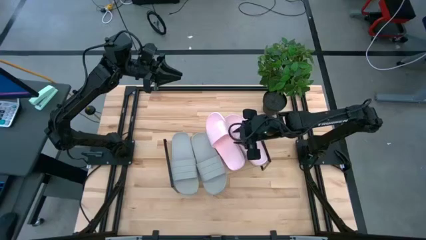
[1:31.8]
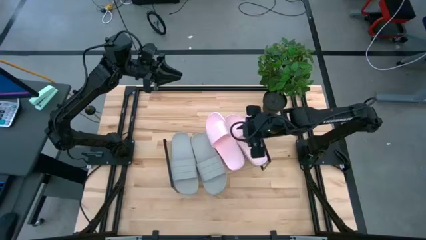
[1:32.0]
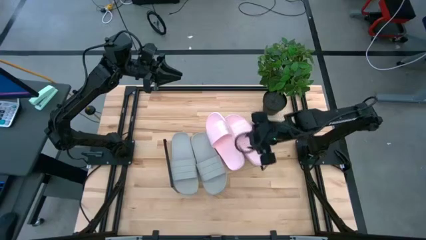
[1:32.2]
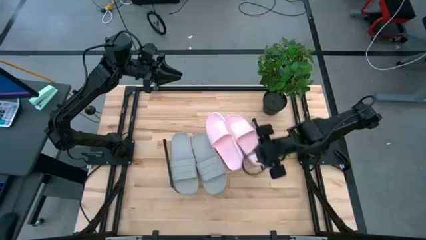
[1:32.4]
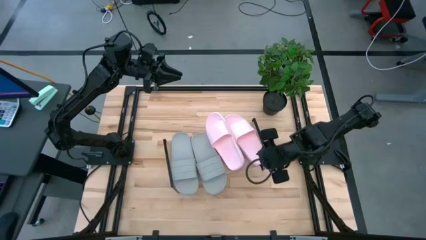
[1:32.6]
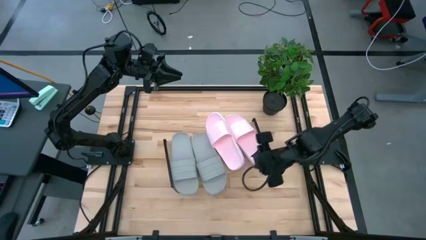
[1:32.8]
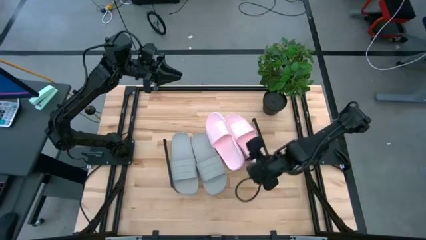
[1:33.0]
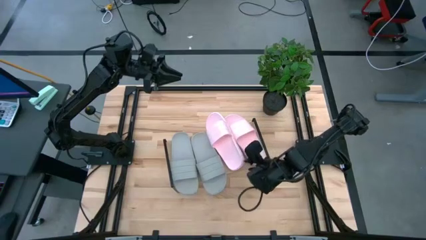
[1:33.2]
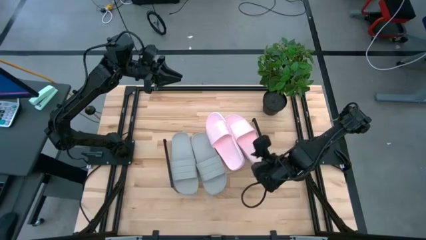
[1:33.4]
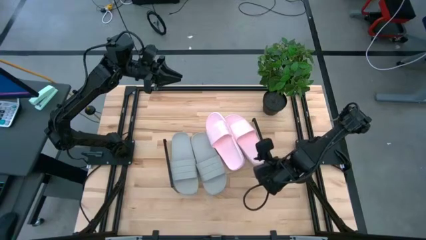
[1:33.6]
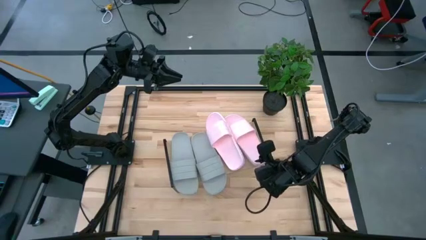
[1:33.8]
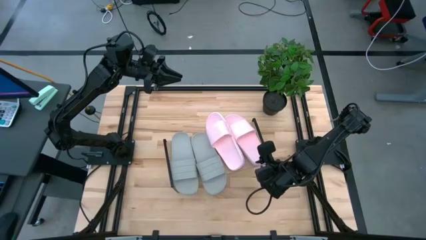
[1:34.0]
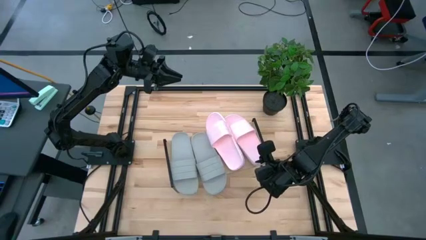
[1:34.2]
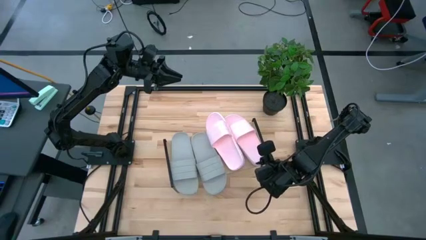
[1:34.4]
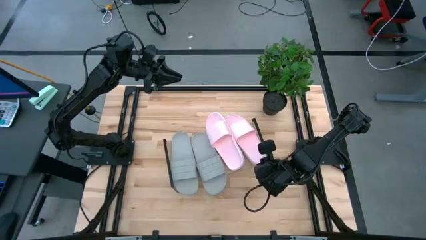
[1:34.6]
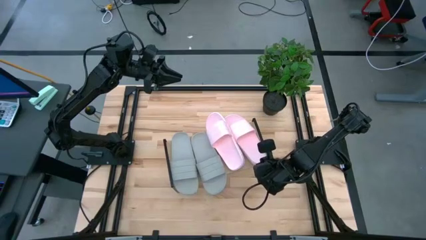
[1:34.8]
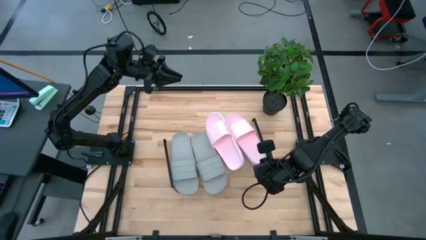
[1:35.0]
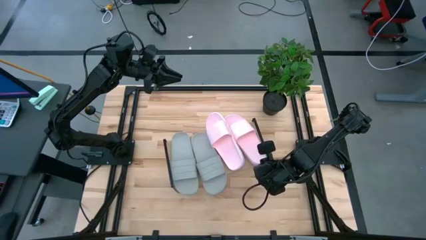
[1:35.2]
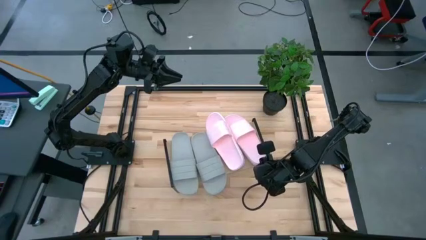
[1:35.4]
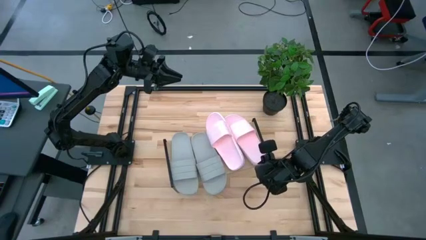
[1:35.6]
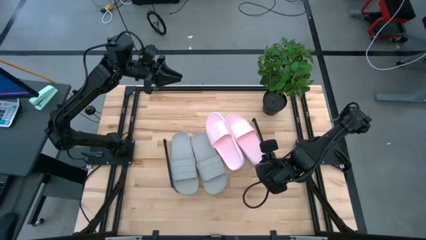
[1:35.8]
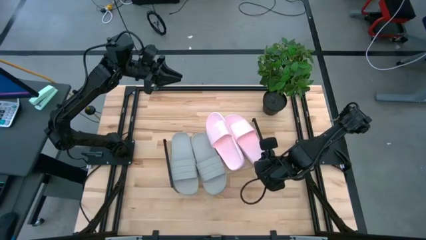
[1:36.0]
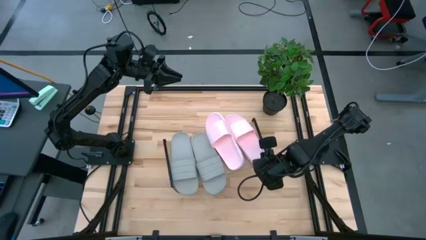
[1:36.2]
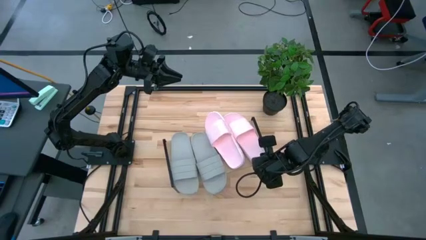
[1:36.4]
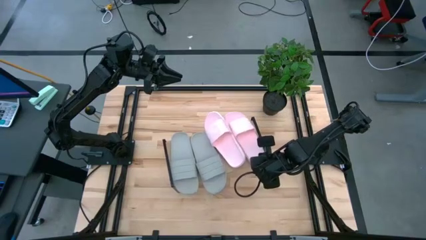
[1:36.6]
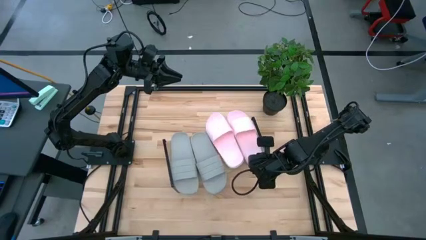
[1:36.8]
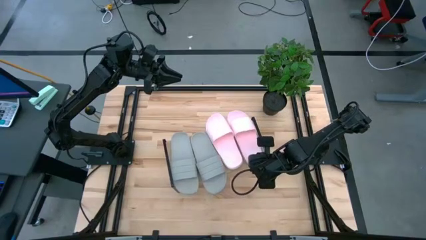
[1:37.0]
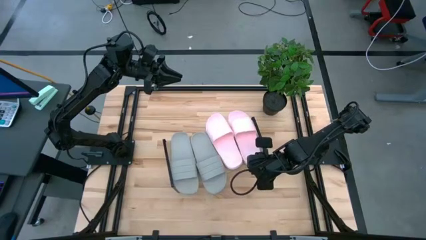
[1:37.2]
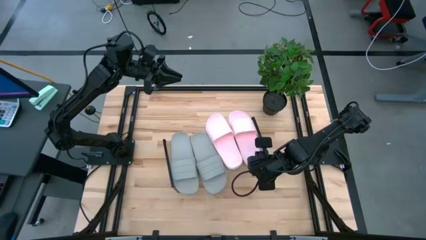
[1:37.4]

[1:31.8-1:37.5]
Task: Pick and place slides into the shelf
Adjust the right pink slide on the shelf

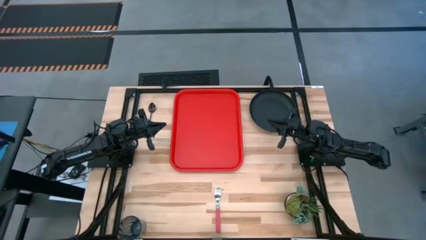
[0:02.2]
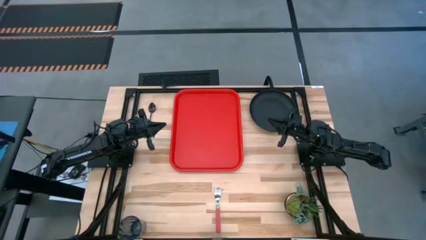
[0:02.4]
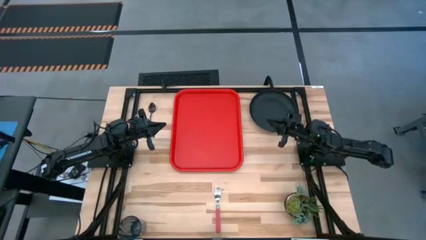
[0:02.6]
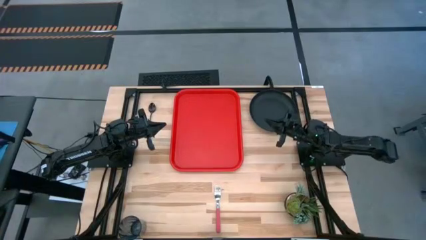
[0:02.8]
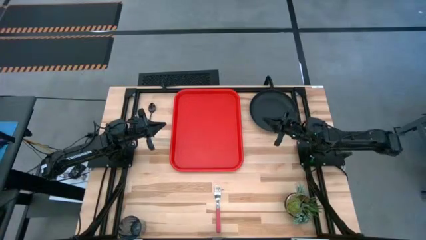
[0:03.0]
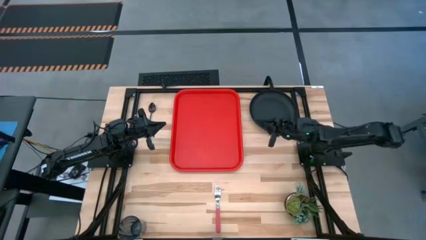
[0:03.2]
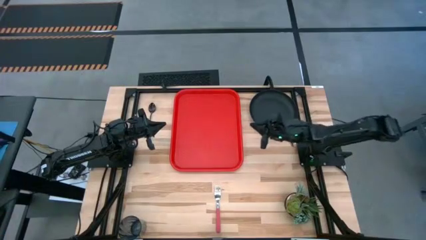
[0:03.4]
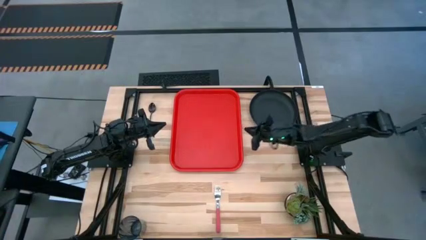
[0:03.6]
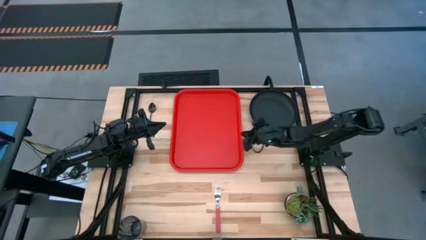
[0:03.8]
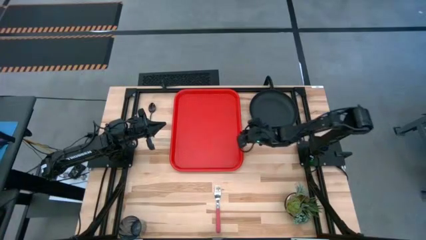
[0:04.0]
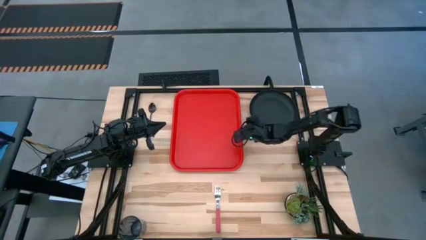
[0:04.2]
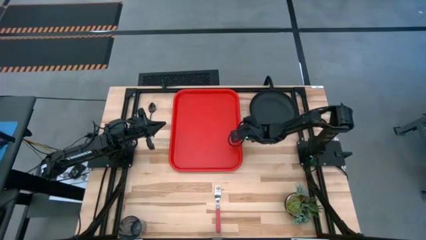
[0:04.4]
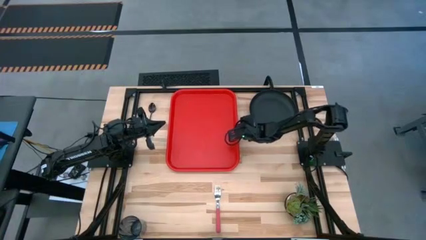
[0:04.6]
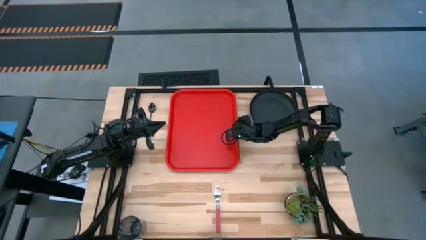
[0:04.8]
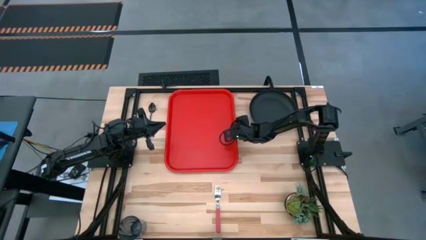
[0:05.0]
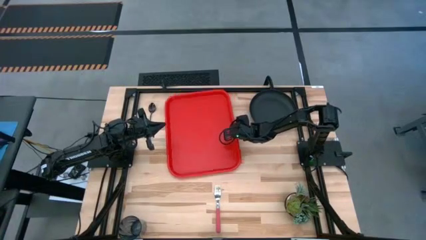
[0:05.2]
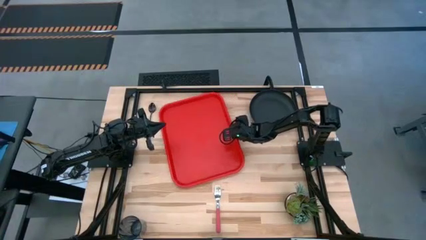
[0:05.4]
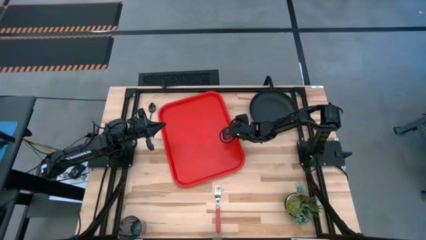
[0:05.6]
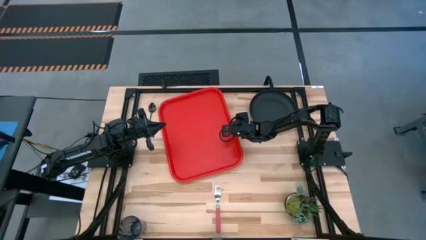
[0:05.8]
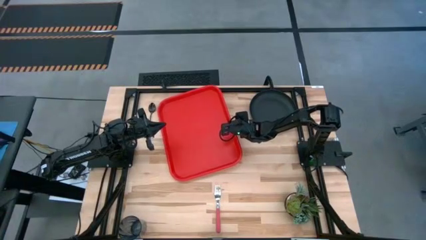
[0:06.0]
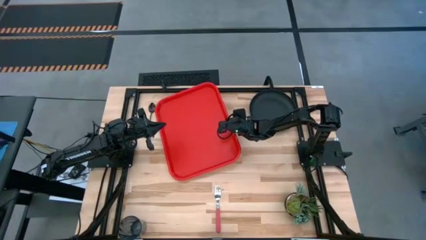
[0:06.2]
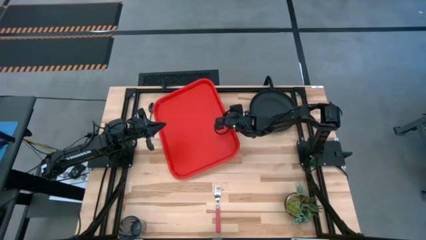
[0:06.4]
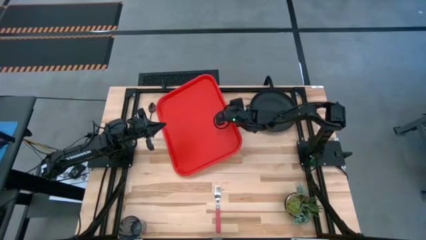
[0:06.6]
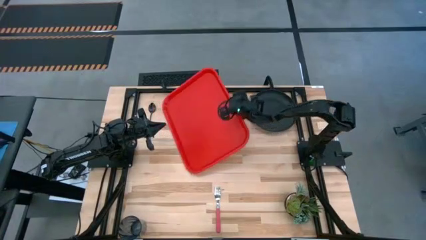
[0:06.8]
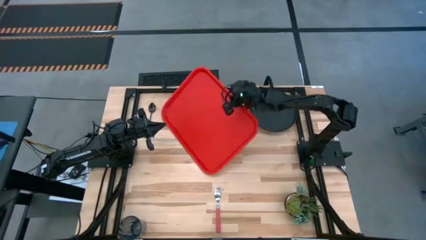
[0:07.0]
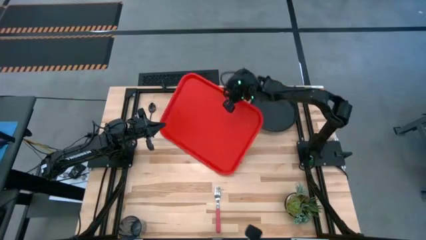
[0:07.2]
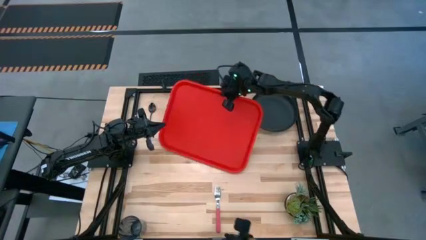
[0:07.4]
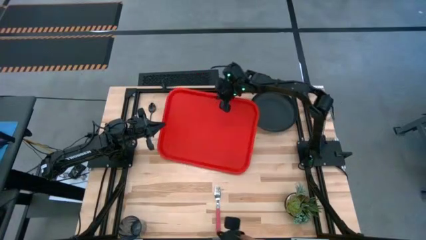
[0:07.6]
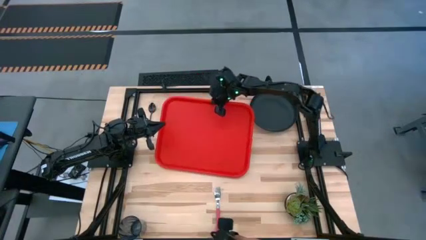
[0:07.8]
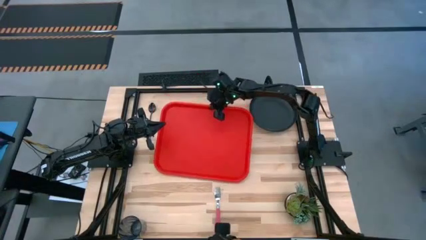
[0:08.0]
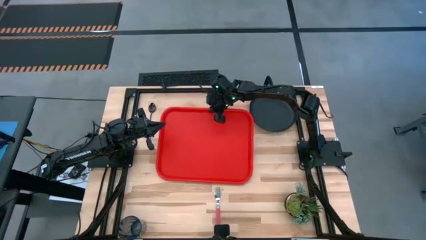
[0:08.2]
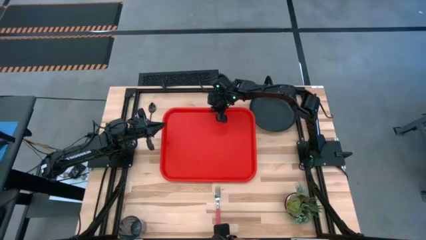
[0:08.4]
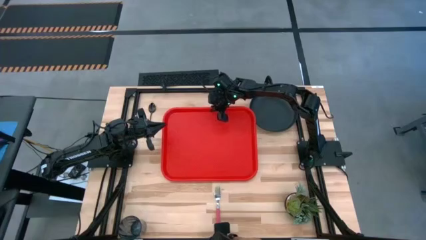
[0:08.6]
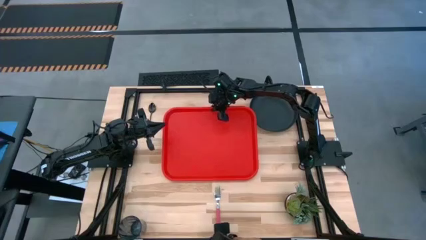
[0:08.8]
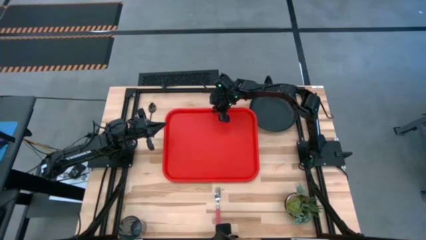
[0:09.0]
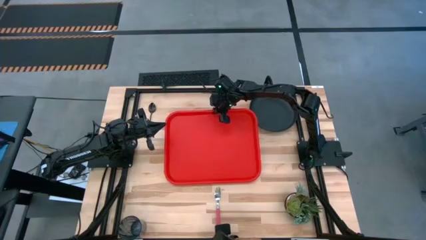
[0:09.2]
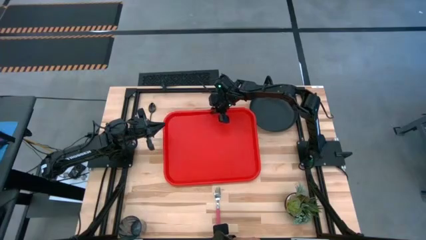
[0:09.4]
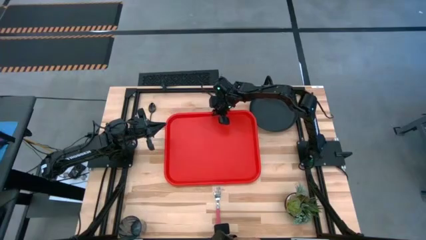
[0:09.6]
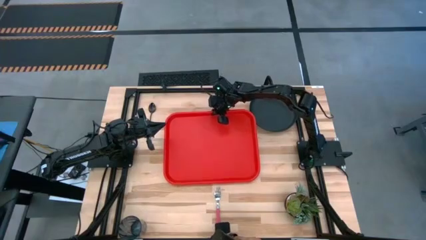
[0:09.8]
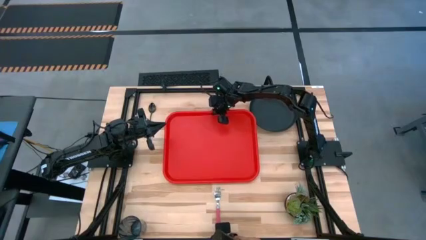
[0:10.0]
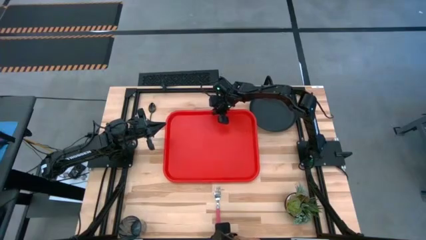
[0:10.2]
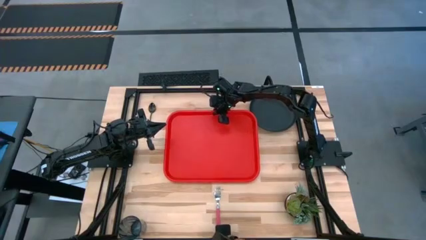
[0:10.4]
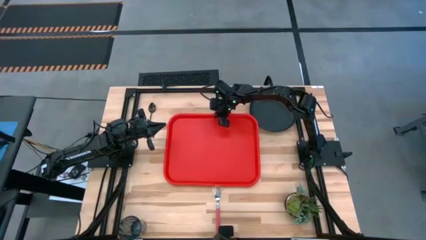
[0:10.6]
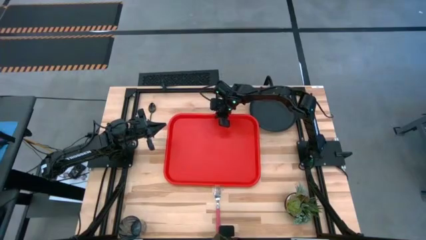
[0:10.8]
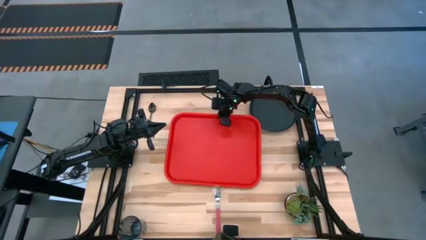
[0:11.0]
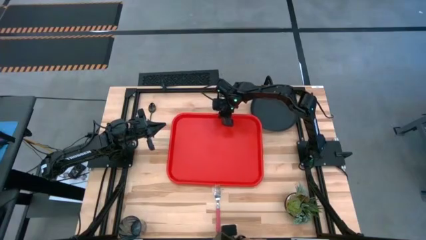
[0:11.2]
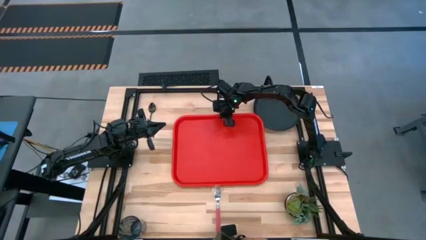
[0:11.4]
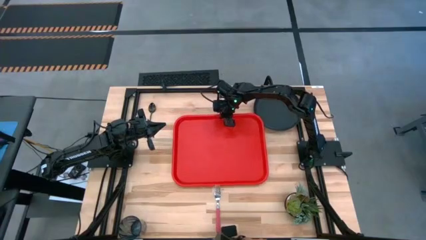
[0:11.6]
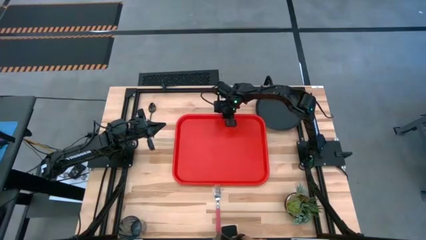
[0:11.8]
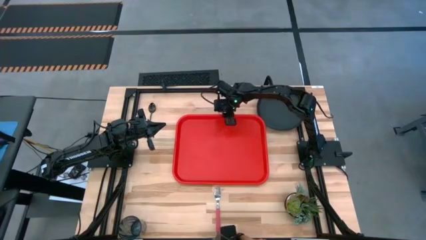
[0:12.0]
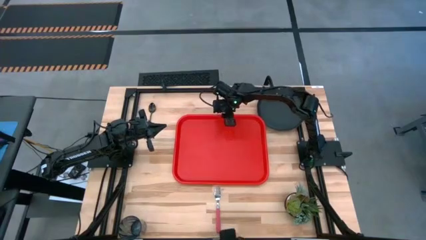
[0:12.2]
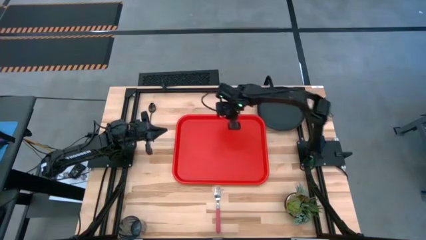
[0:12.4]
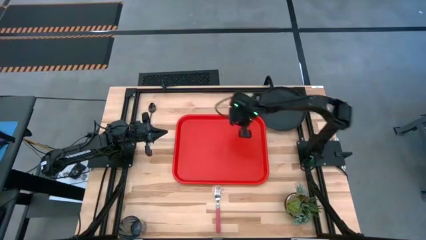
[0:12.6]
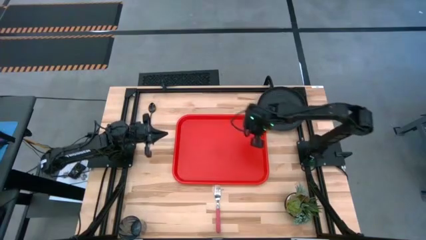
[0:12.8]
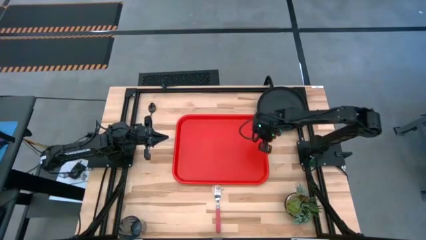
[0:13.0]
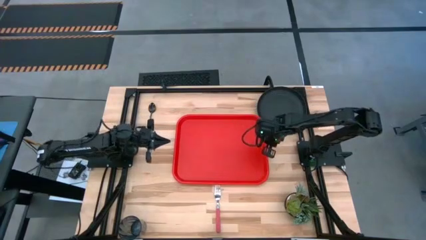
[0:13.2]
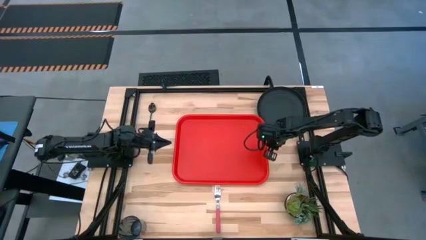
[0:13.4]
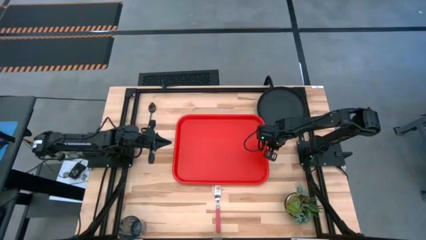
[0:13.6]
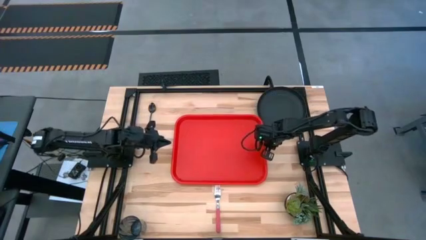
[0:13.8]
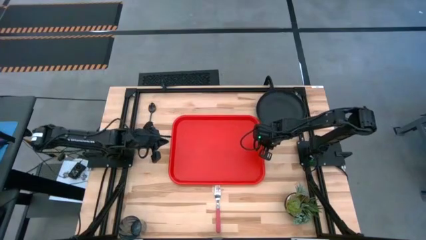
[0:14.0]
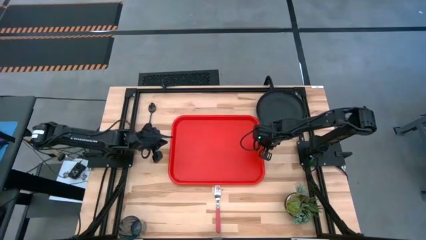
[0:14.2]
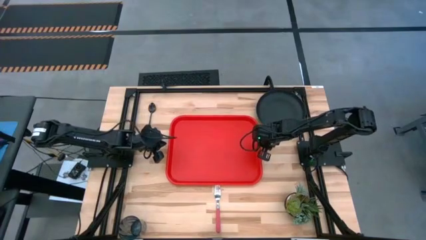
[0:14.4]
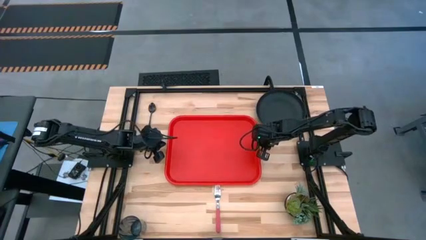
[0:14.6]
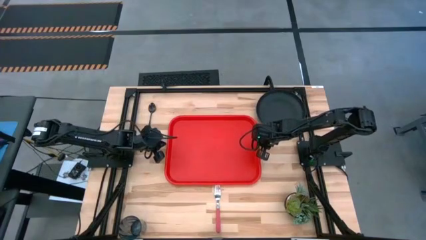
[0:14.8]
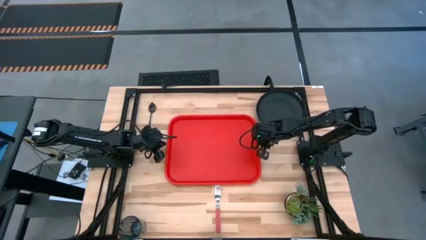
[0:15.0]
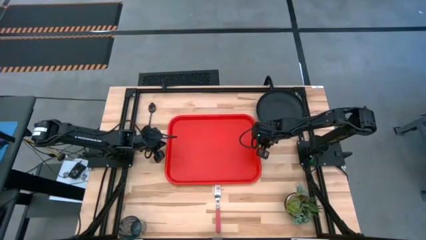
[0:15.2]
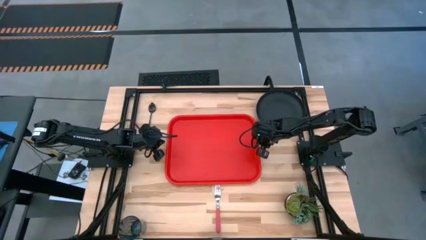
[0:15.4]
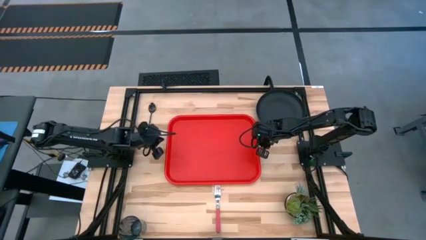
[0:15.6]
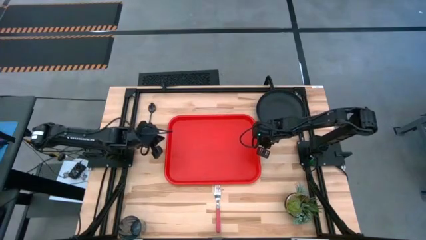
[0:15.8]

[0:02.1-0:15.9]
Task: Pick and place plate/cup/fork/spoon on tray
Set up the red tray on the table
